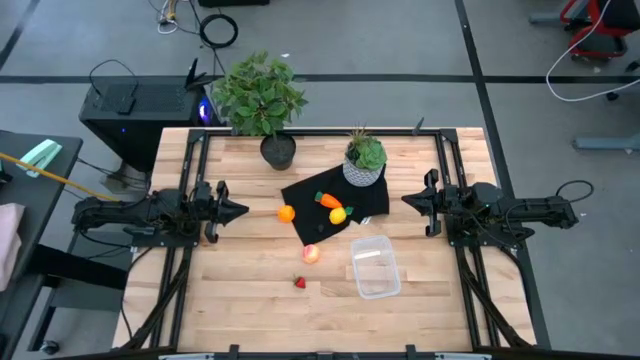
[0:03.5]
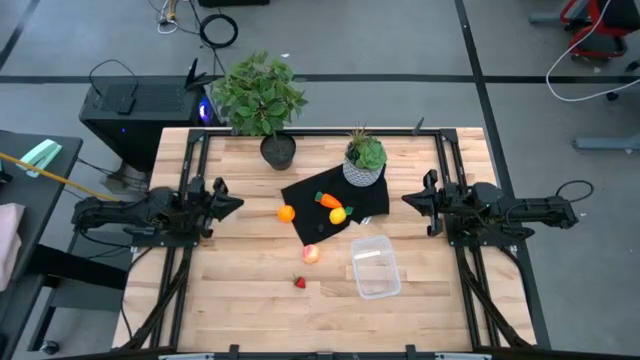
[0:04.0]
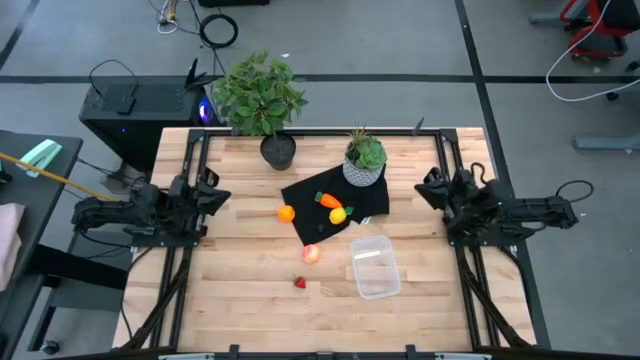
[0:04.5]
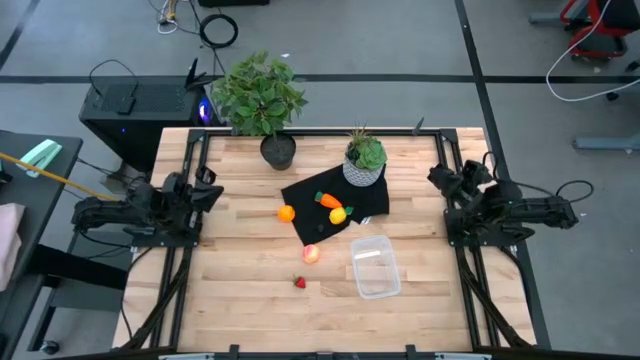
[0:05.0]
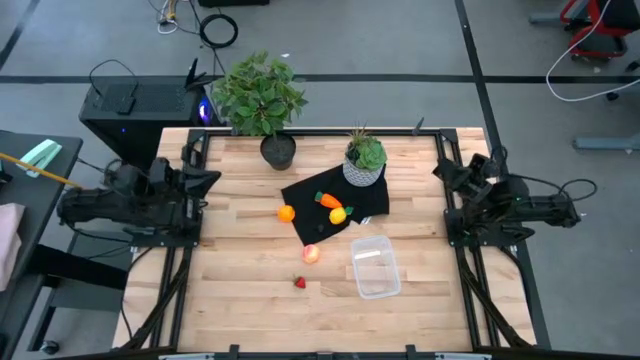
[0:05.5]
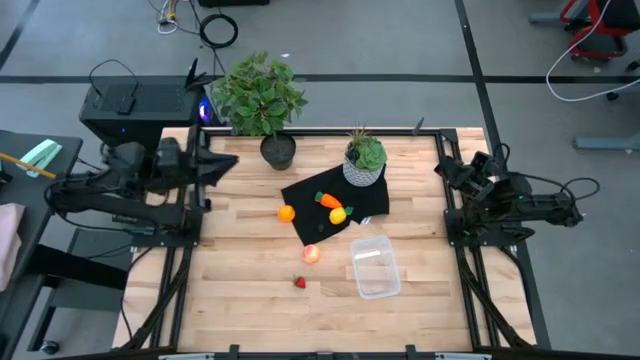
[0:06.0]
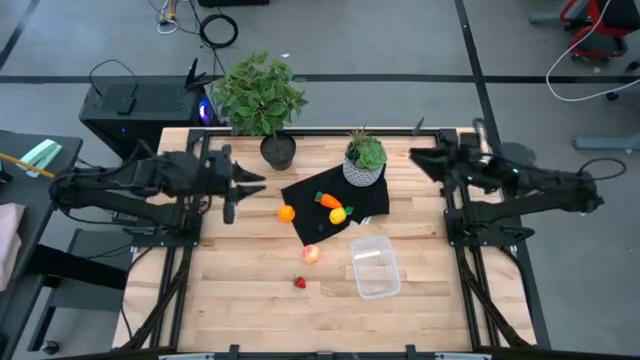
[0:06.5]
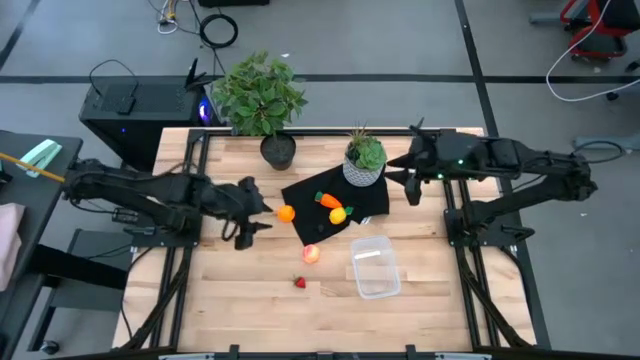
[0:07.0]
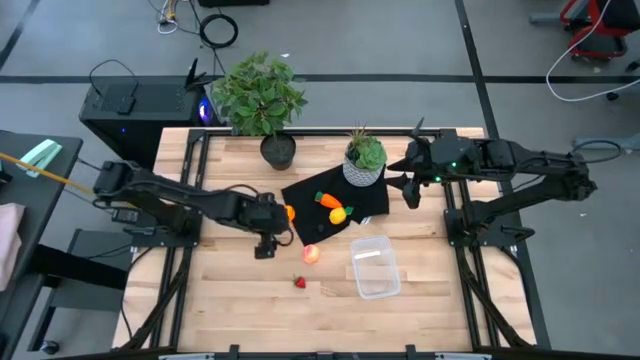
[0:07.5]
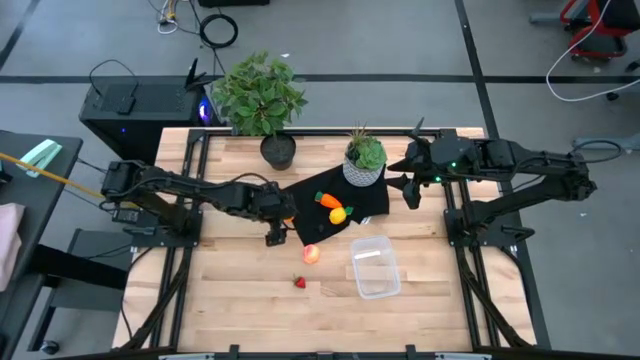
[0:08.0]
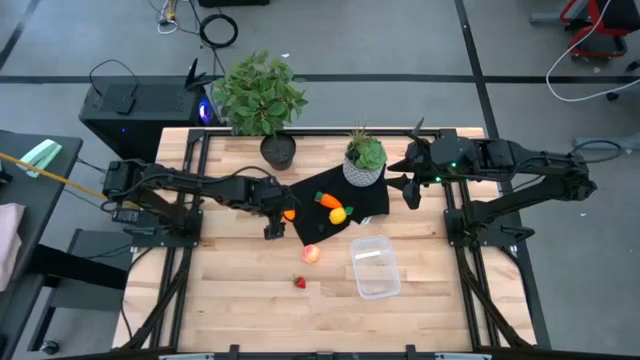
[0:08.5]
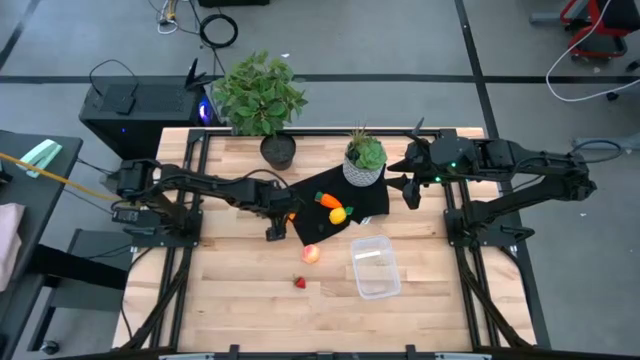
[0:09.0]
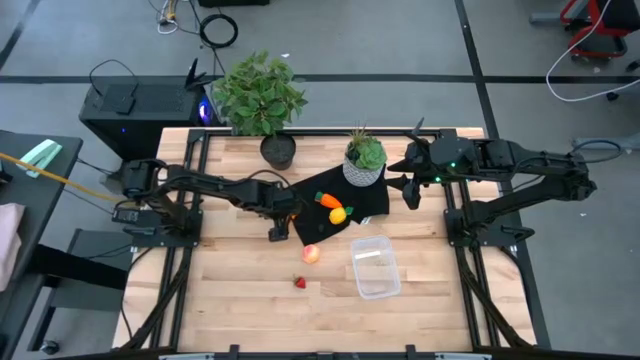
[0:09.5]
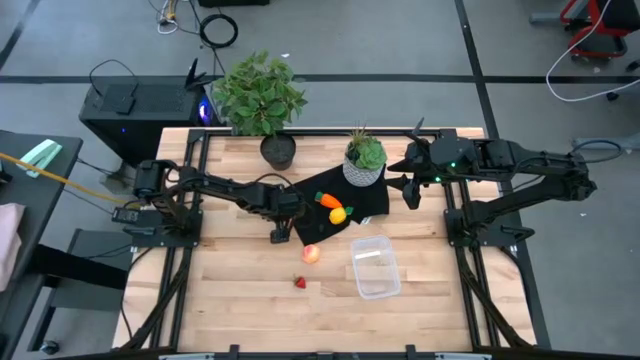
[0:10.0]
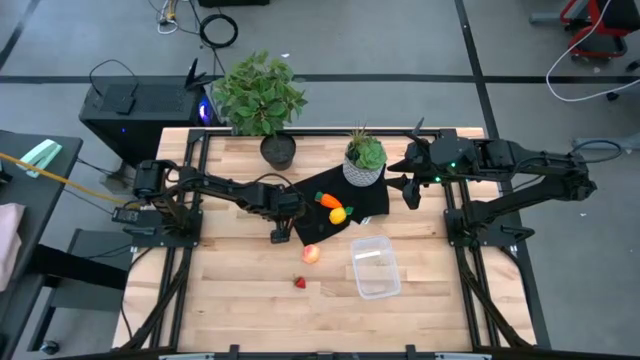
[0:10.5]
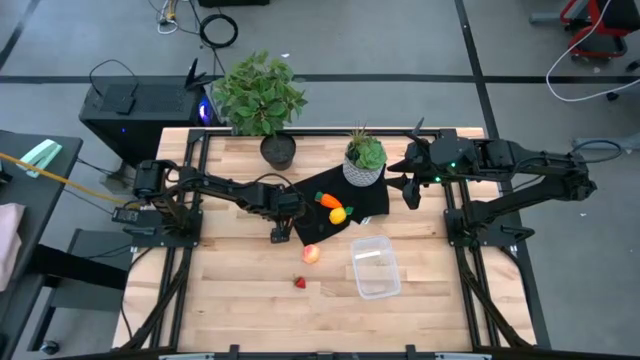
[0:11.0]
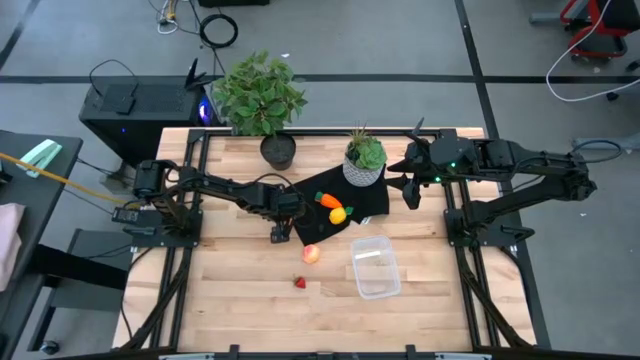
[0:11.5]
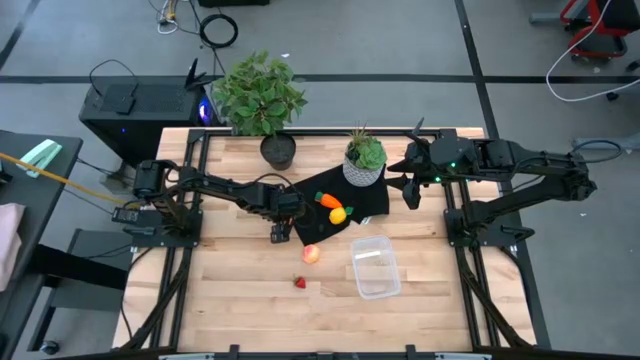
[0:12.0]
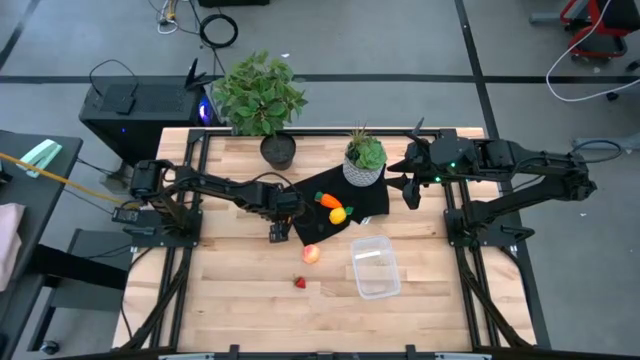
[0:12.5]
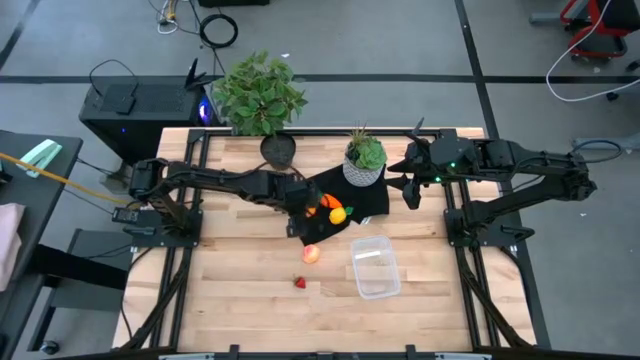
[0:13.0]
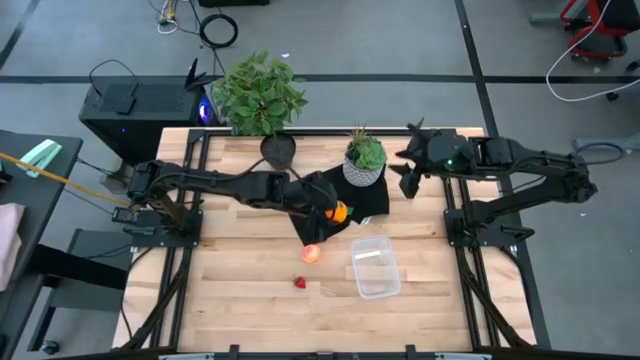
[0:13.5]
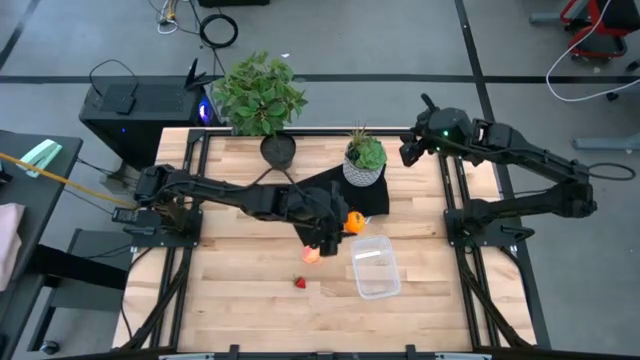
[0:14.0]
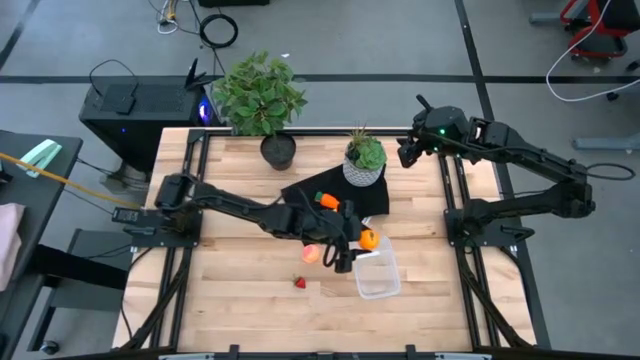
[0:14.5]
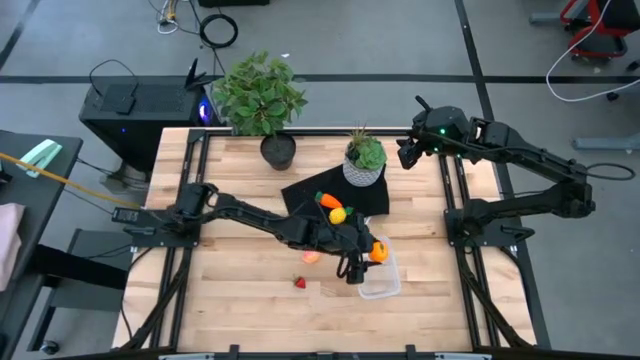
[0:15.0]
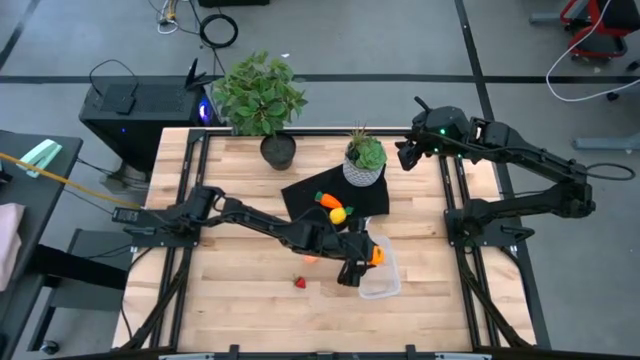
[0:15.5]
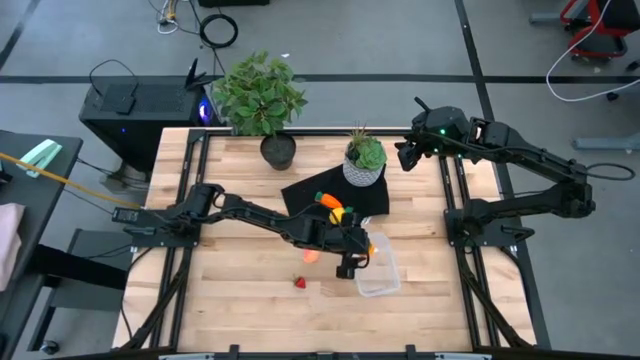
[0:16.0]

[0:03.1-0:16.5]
Task: Pick and placing Produce into tupperware
Put the orange into the transparent bin

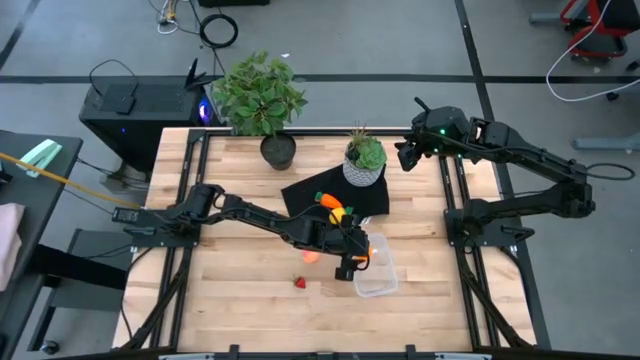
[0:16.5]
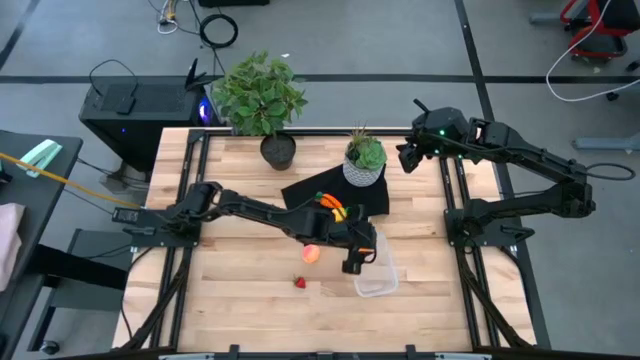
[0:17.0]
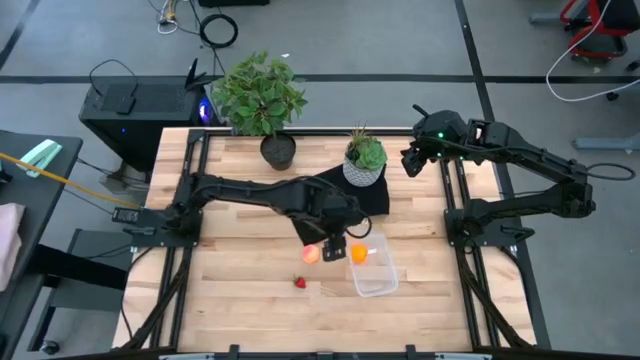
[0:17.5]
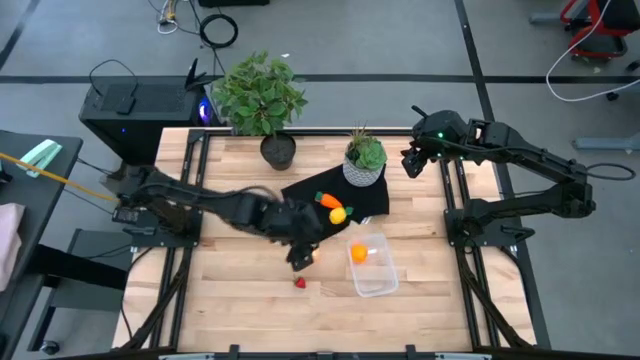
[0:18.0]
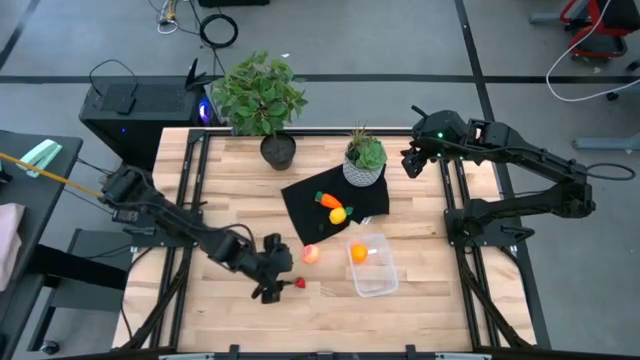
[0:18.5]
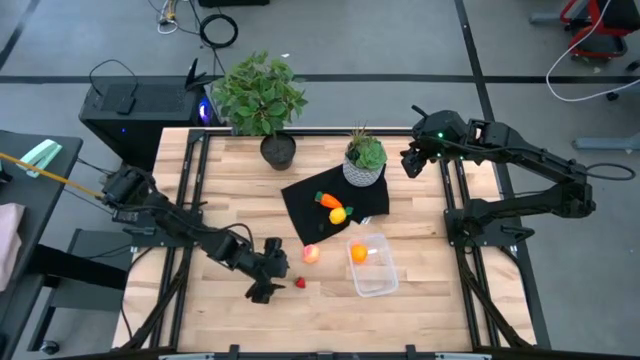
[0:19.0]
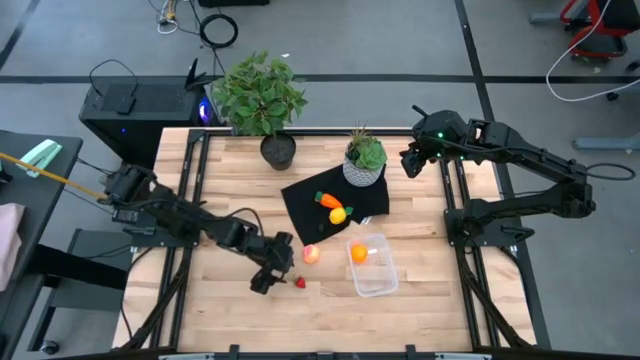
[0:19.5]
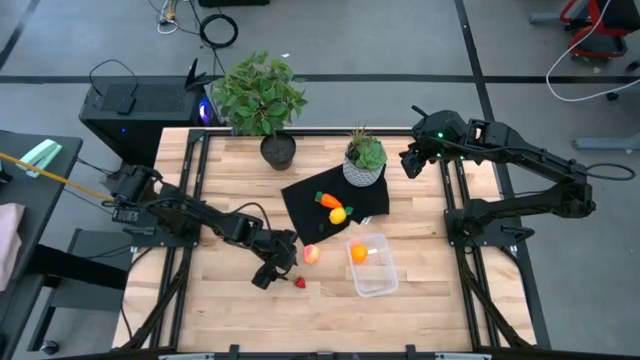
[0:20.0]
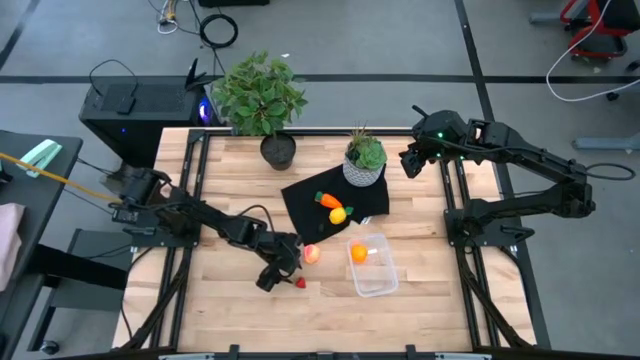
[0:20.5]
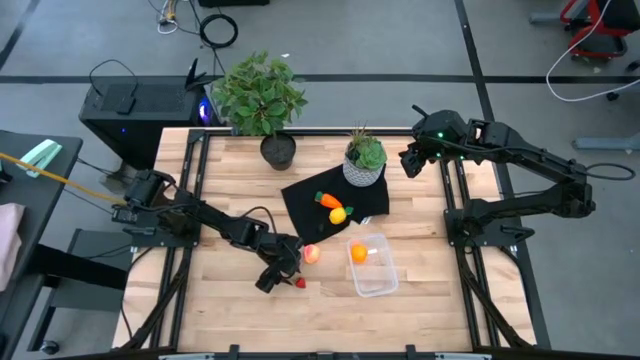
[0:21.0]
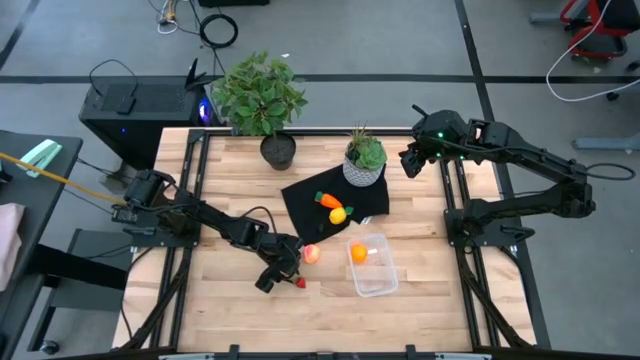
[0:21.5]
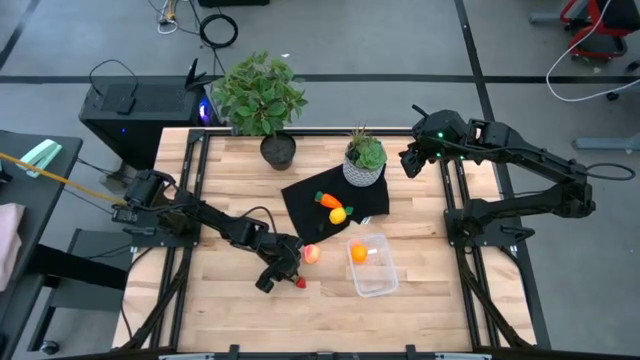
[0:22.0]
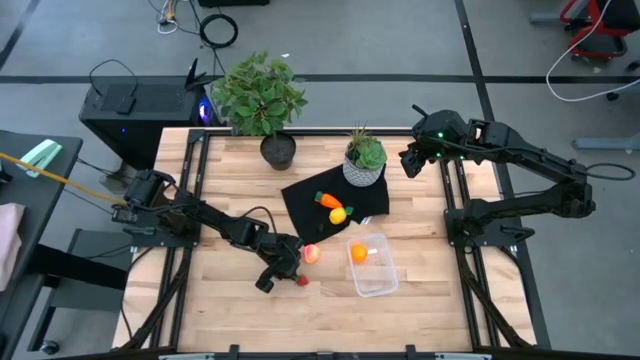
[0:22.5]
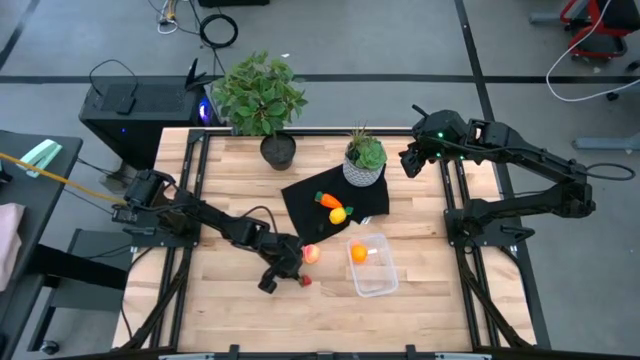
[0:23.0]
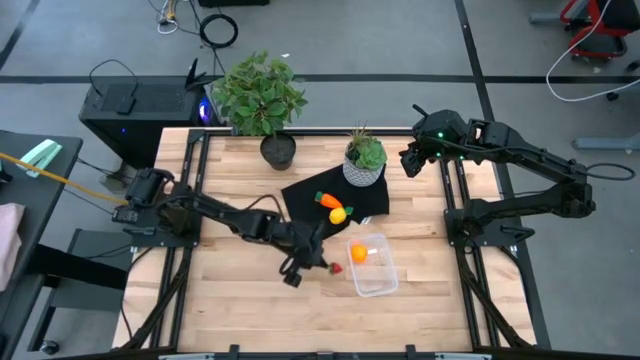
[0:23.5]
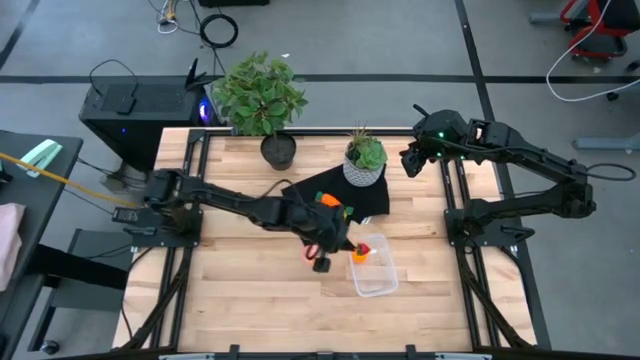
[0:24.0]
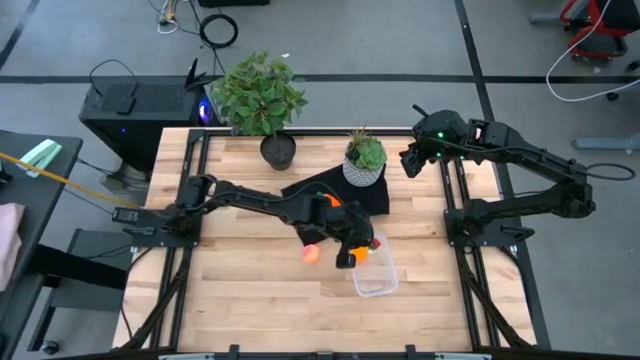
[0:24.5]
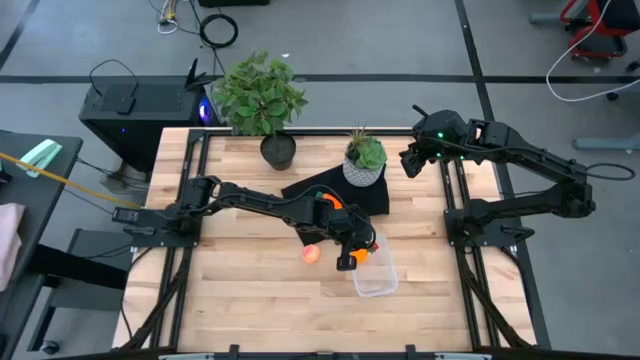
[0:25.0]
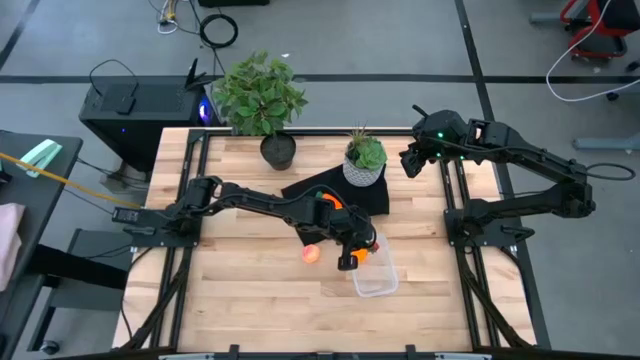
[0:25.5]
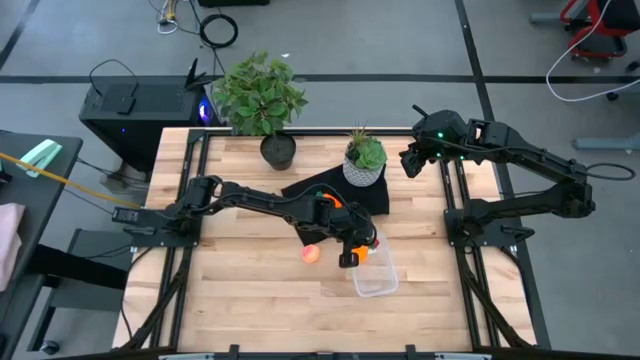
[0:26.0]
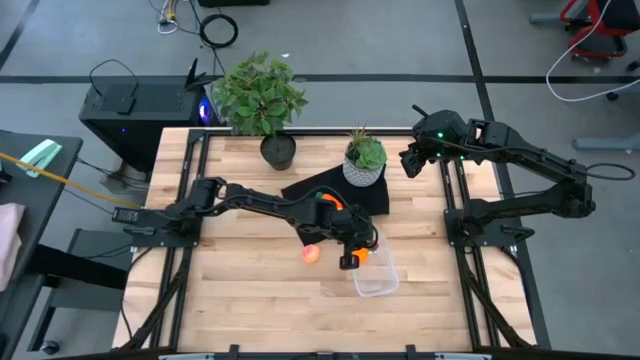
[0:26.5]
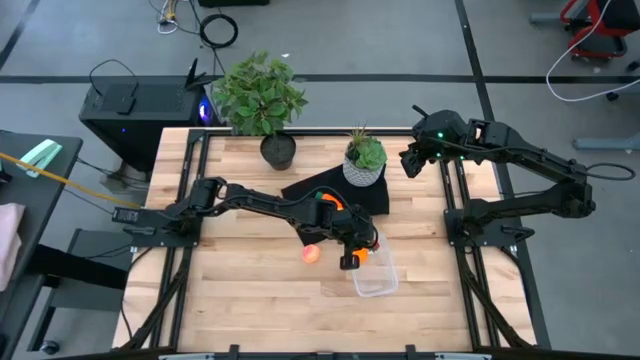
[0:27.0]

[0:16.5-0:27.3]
Put the strawberry into the transparent bin
